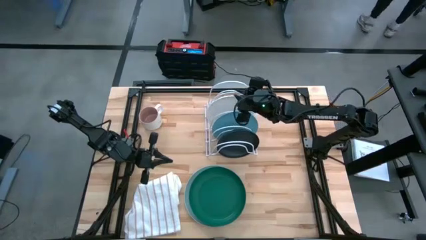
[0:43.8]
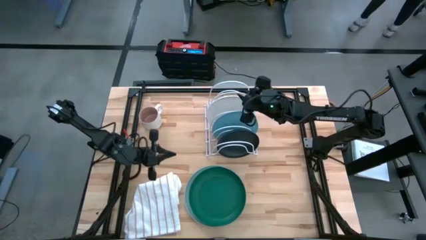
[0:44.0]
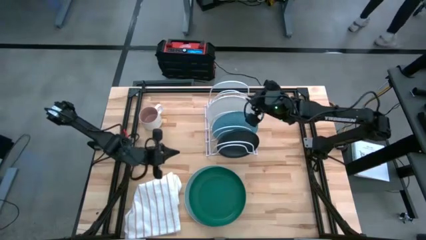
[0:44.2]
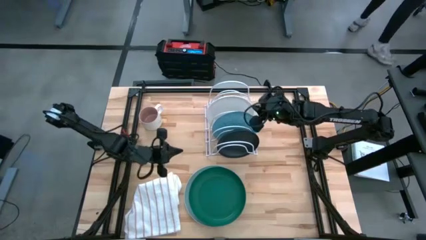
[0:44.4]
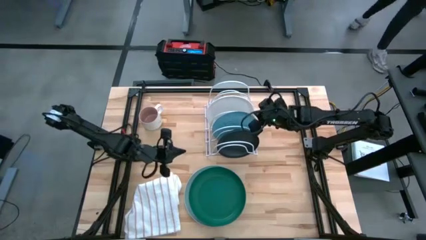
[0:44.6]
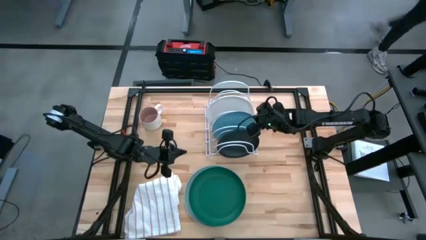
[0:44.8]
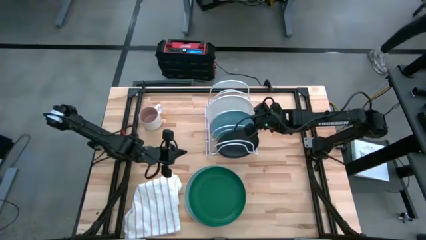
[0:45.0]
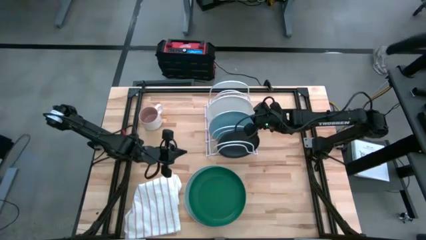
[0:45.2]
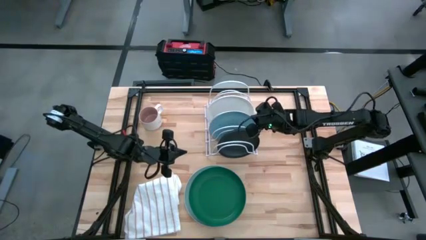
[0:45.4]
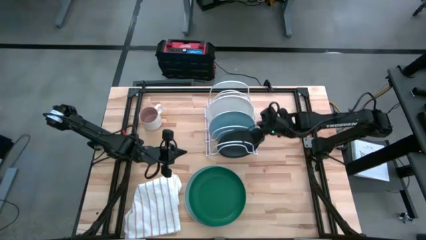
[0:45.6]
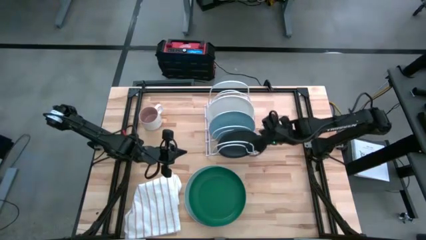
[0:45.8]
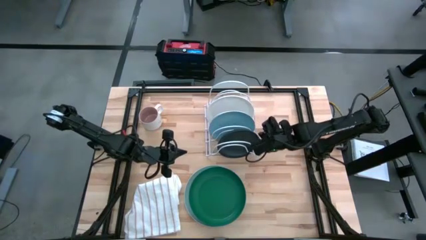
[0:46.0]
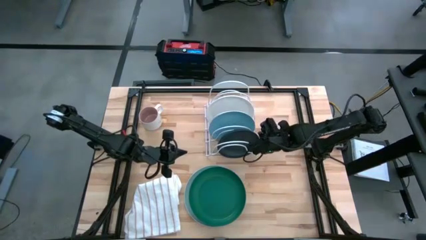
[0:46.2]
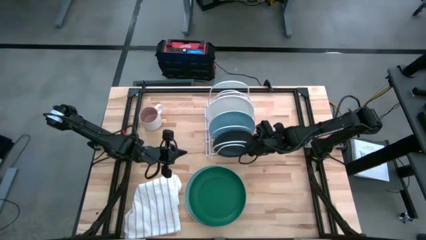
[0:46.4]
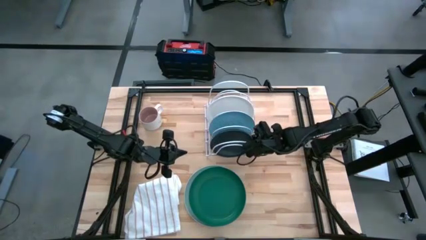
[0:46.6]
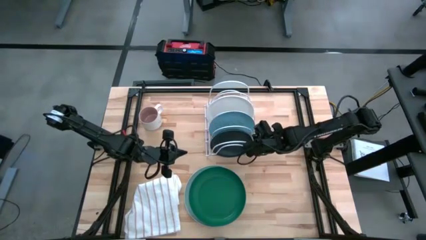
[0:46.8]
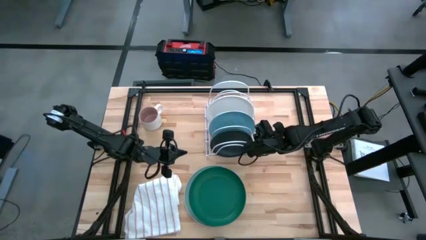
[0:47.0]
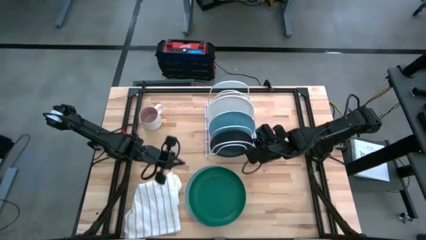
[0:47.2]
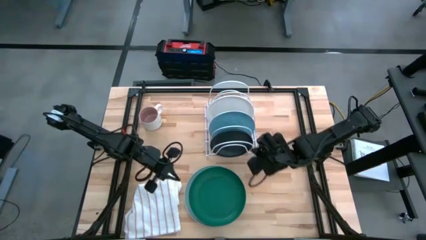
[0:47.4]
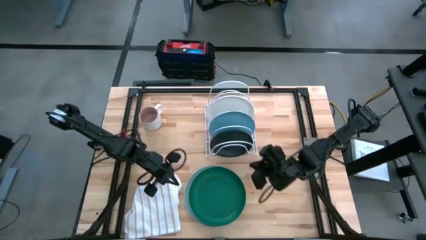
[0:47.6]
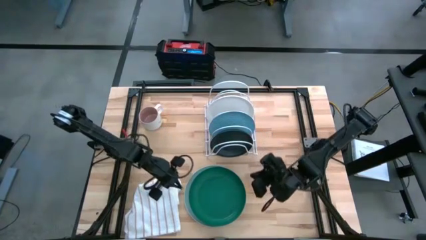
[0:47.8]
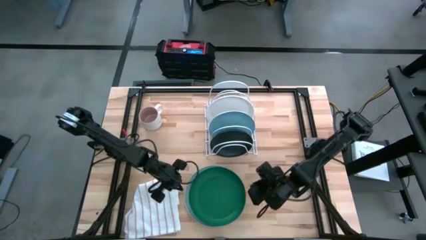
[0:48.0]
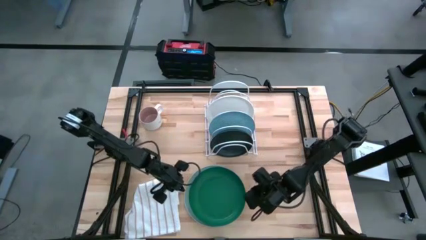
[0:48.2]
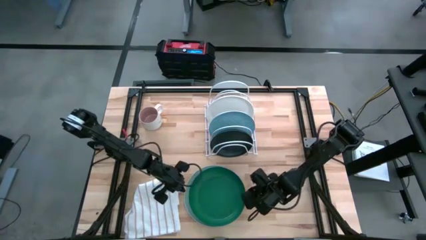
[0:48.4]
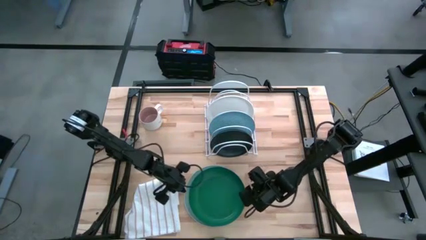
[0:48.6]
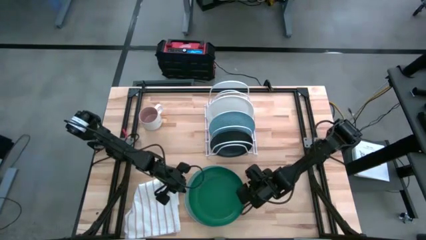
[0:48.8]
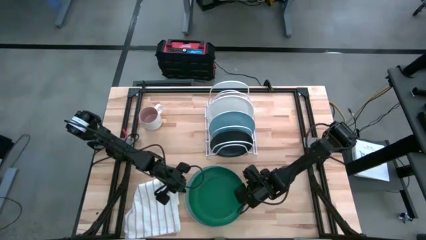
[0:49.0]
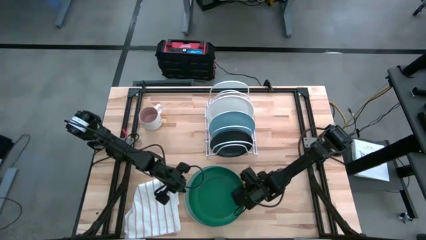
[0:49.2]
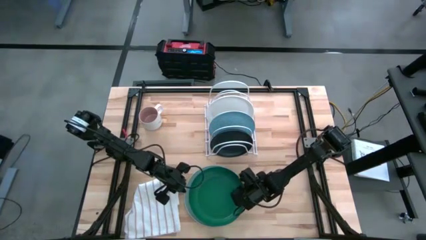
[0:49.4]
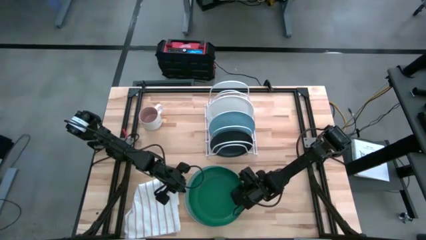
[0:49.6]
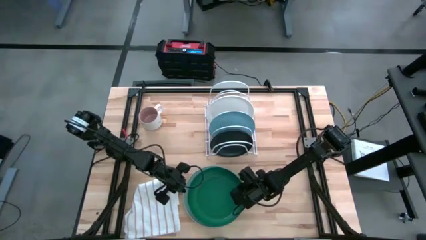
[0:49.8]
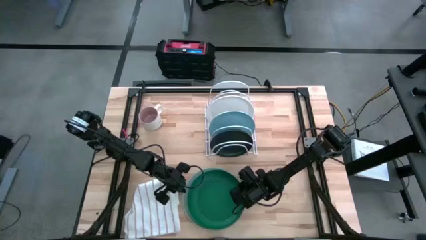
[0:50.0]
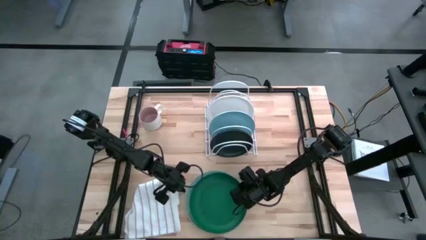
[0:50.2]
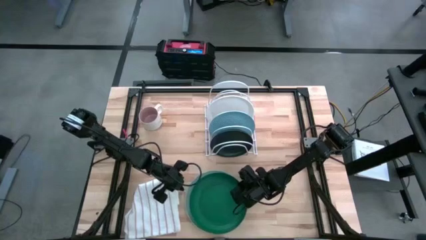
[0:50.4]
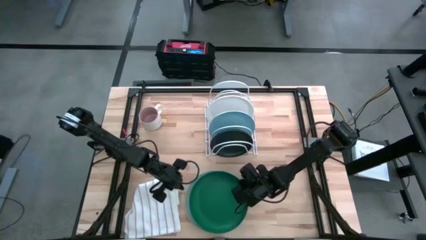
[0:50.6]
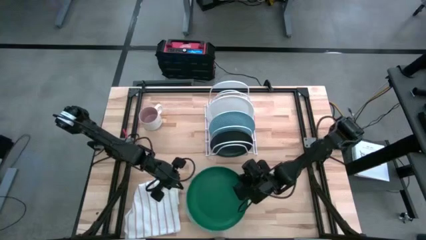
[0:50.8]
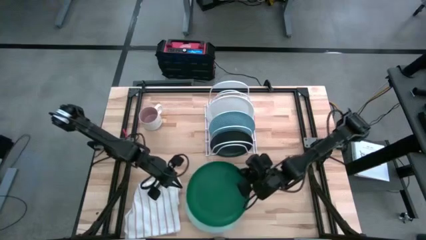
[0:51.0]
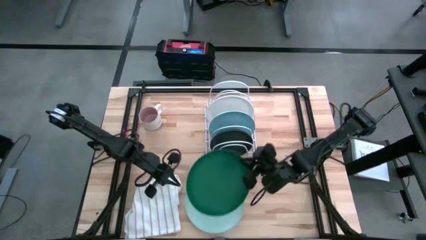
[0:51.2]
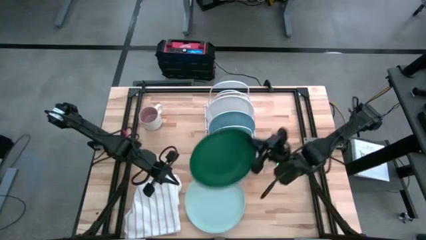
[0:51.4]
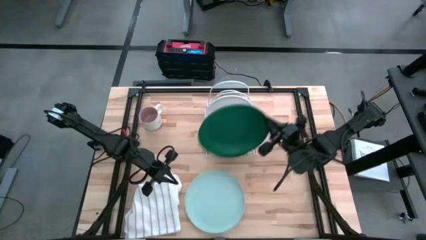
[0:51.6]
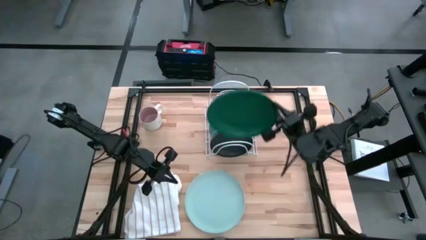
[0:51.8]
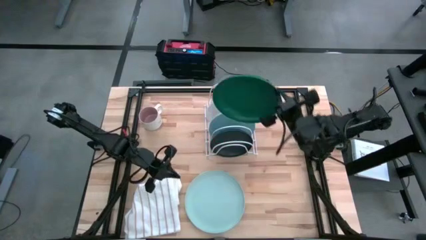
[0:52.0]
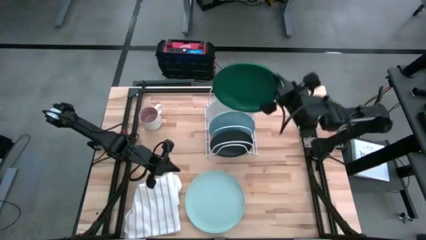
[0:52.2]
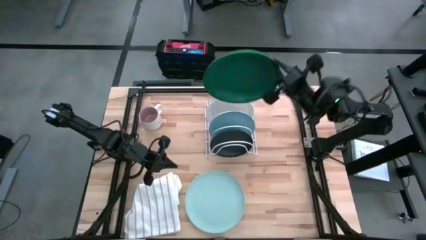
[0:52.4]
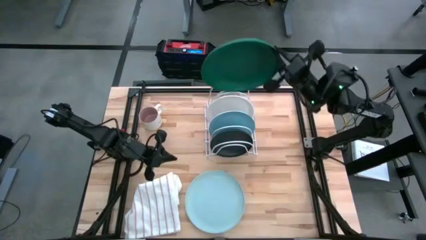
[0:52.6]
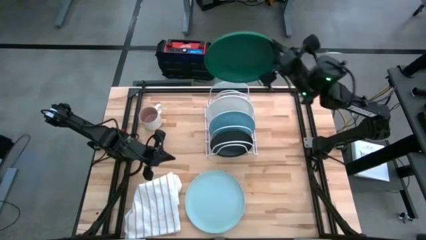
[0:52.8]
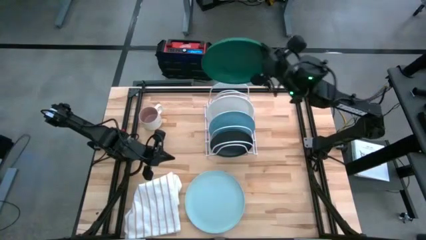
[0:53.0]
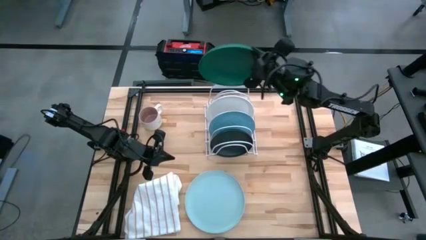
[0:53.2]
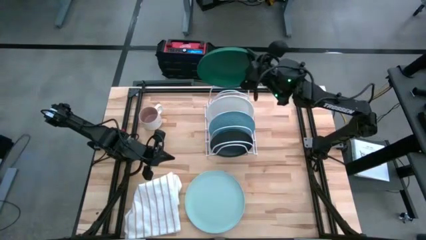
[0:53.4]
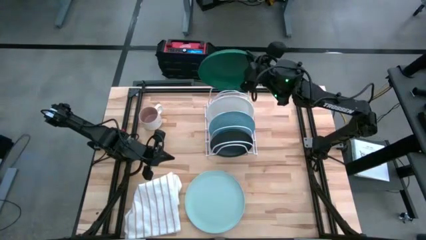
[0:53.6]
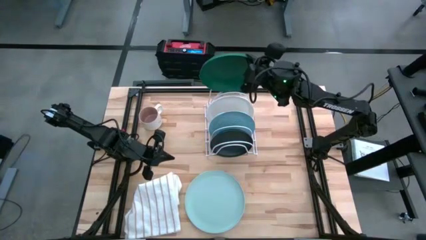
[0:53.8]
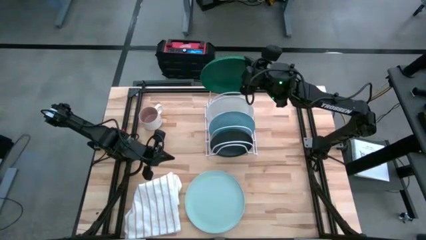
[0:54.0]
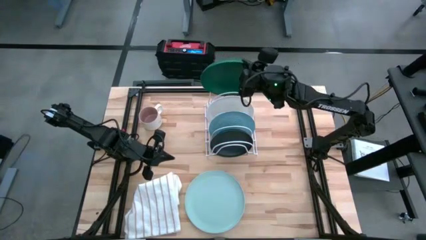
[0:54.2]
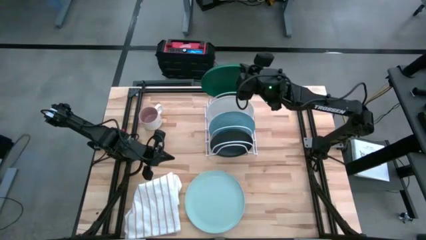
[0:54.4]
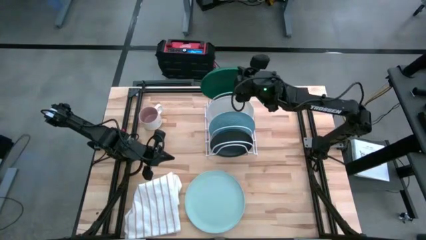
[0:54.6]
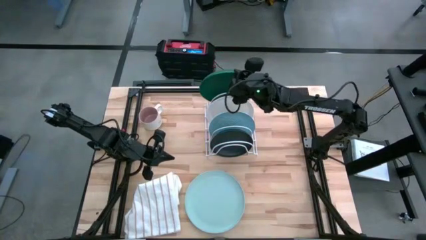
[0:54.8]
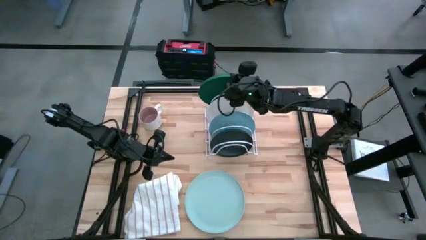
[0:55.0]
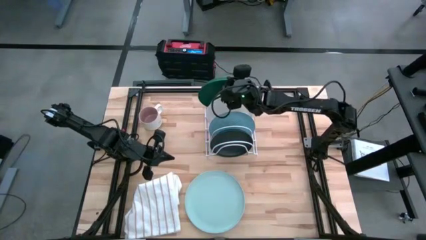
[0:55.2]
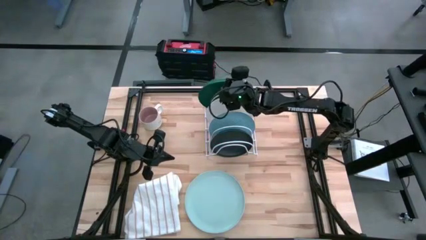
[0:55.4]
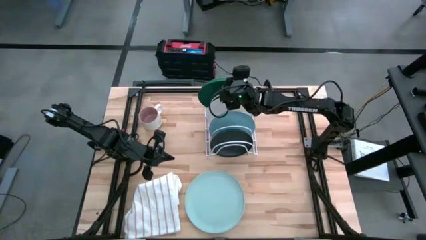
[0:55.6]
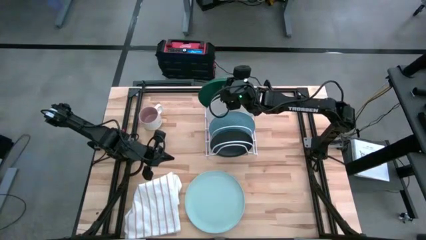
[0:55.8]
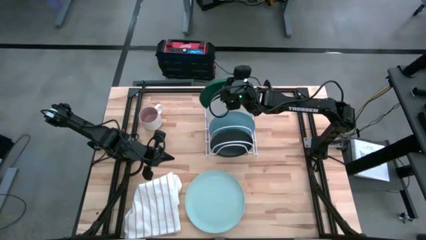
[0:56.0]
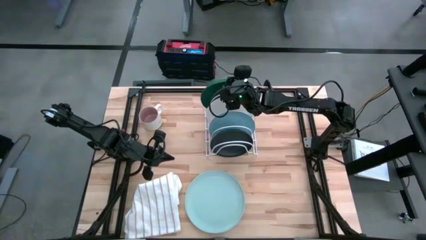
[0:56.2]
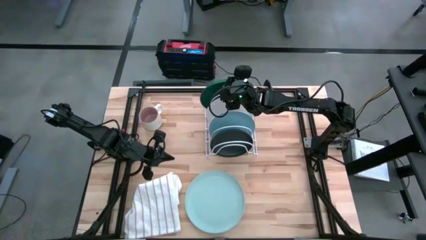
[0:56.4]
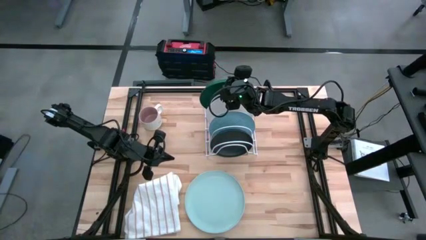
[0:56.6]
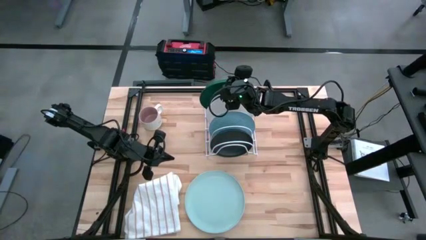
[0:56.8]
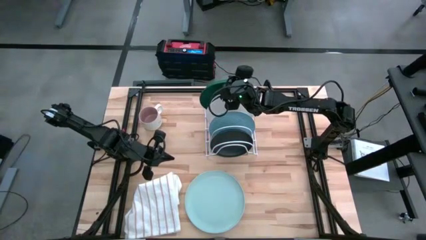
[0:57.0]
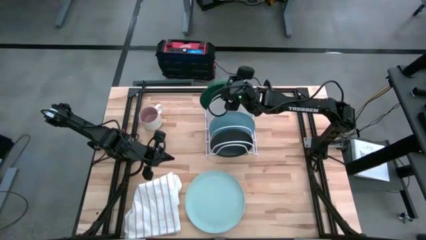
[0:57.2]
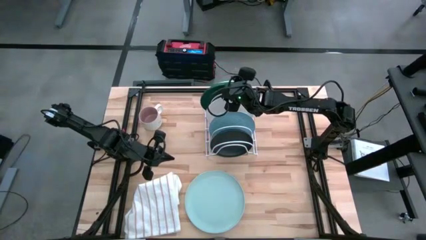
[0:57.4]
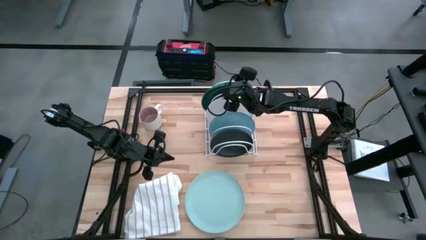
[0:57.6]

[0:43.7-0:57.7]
Task: Sort dishes
Put the green plate into the dish rack

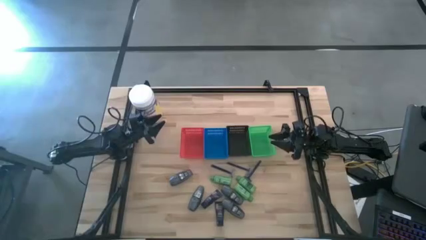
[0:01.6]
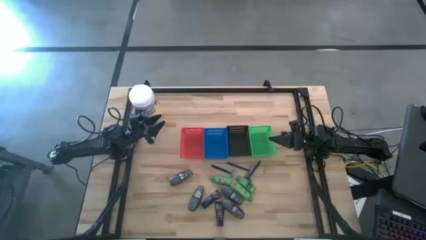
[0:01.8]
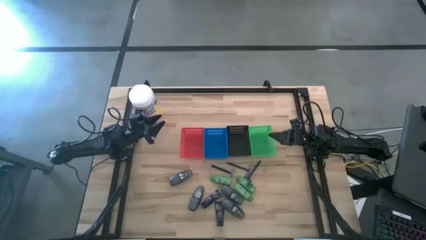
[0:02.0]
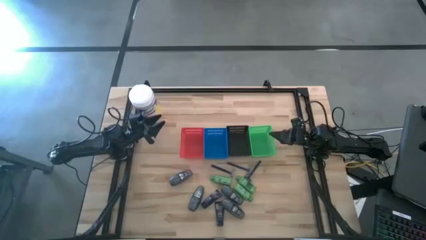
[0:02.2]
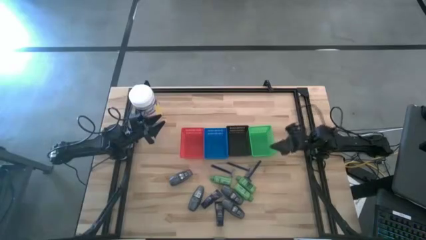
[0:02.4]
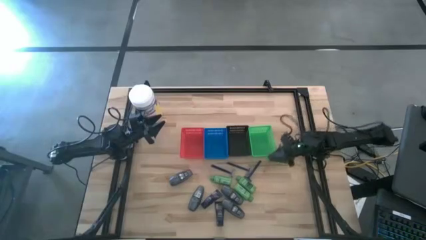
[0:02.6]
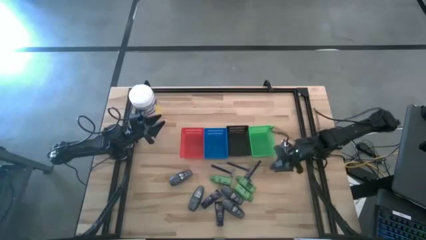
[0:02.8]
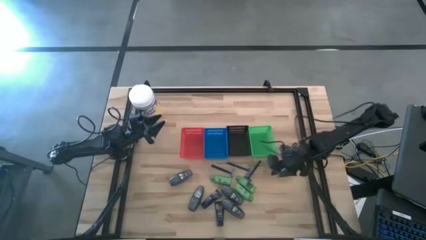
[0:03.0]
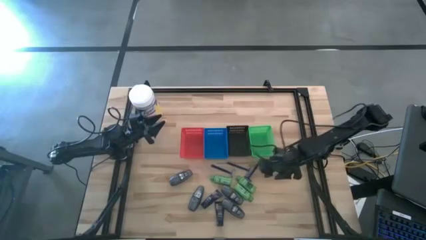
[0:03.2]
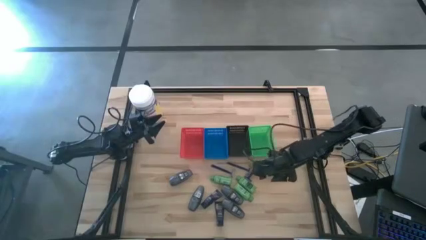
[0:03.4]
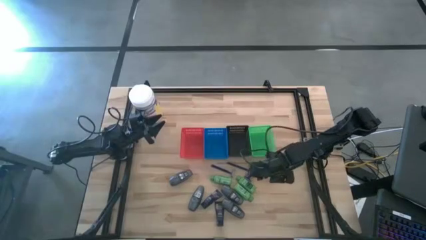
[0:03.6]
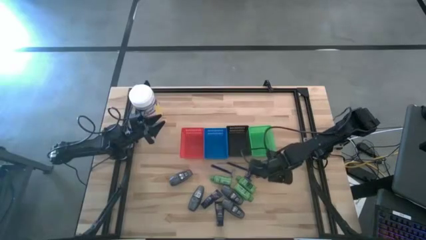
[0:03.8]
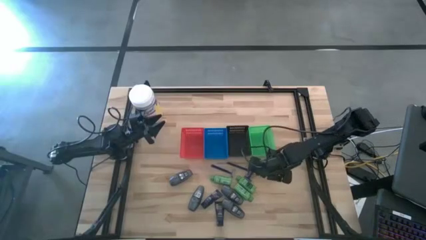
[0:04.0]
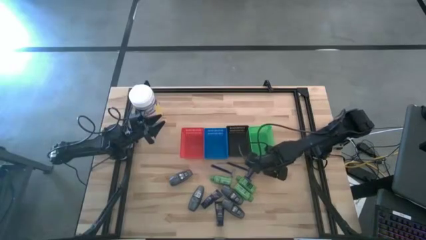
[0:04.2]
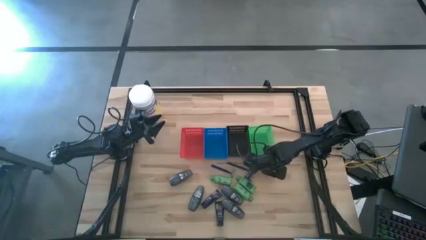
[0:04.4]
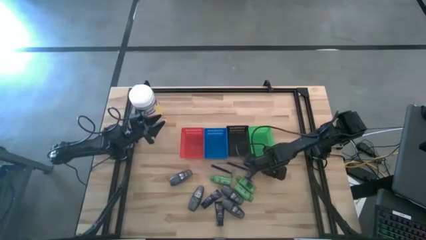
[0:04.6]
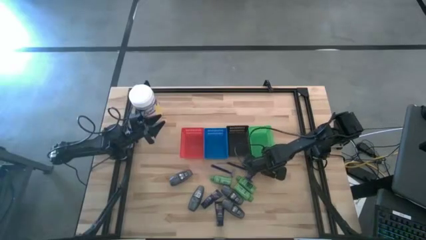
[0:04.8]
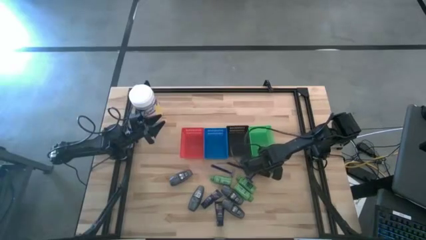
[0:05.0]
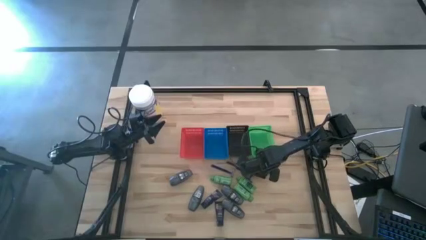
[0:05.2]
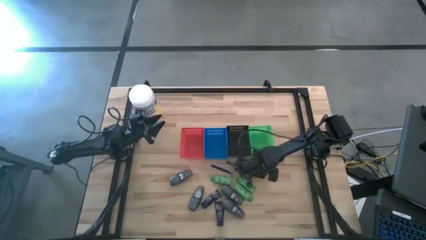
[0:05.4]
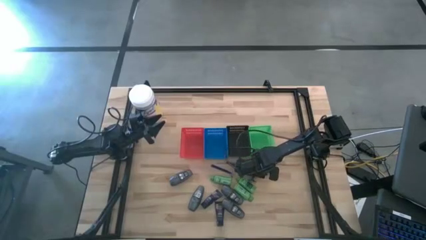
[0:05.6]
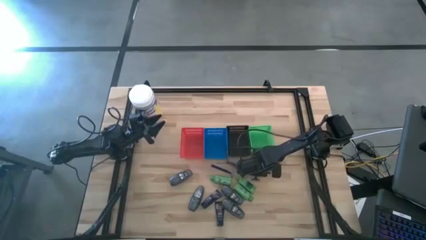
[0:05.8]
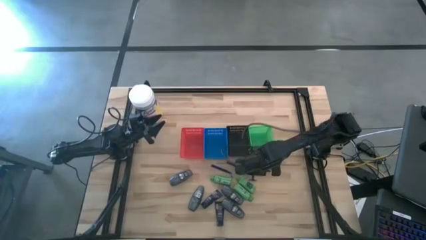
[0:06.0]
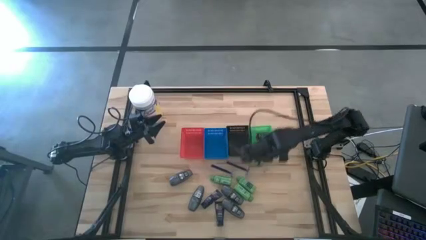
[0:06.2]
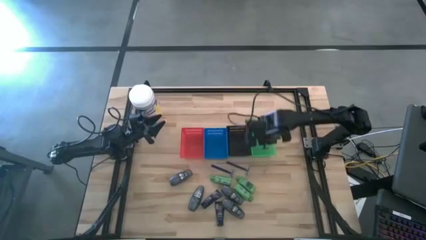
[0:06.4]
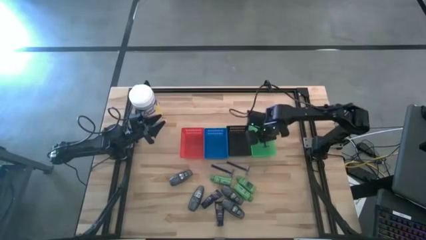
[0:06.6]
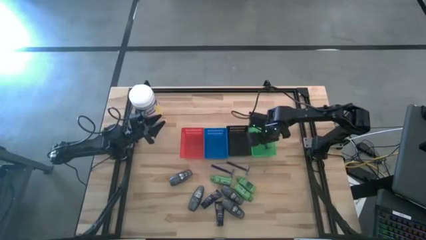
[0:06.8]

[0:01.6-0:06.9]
Task: Pick & Place Travel size toiletries
Put the blue razor into the green bin
